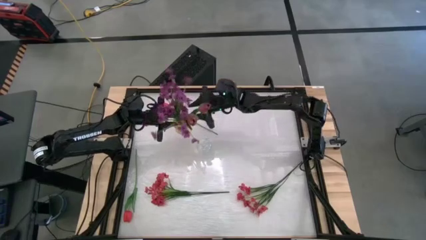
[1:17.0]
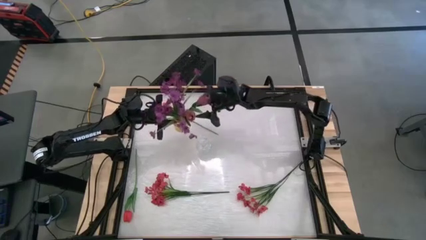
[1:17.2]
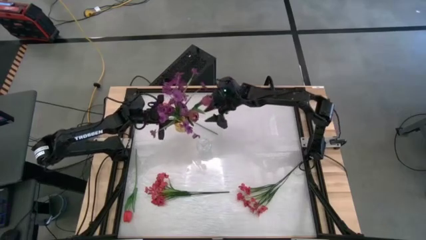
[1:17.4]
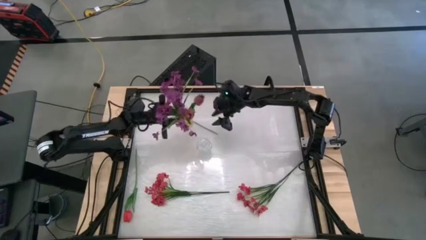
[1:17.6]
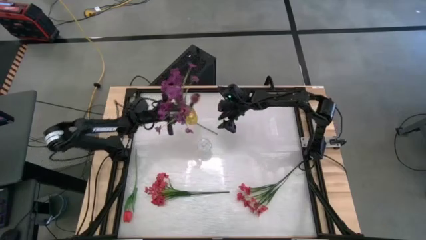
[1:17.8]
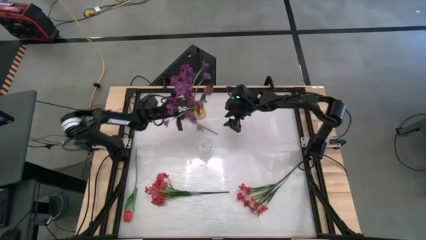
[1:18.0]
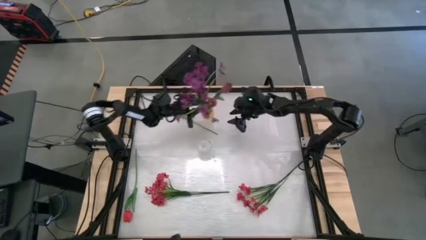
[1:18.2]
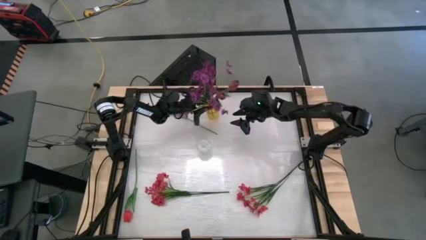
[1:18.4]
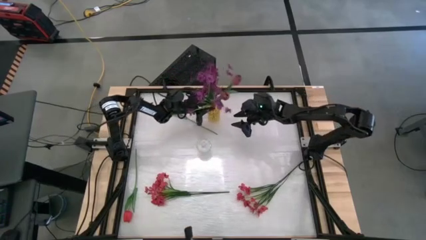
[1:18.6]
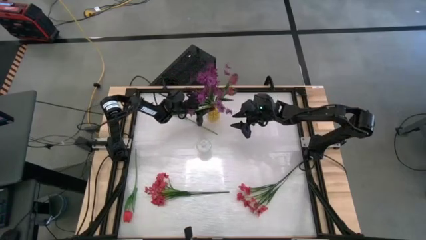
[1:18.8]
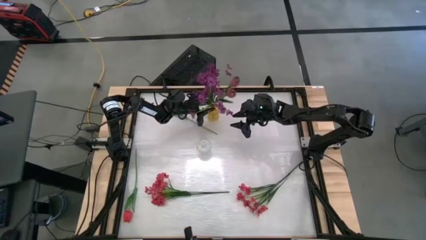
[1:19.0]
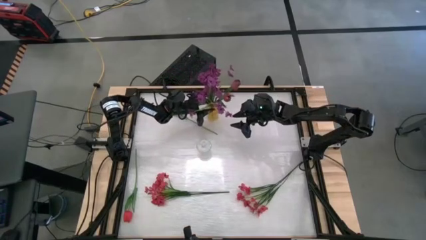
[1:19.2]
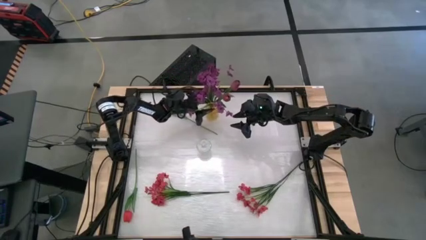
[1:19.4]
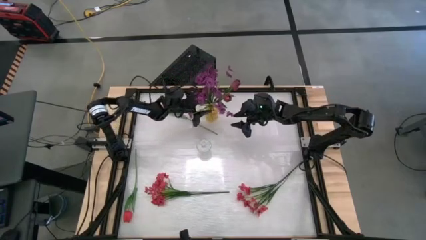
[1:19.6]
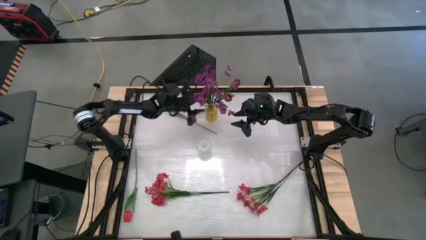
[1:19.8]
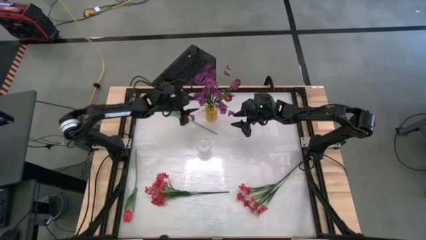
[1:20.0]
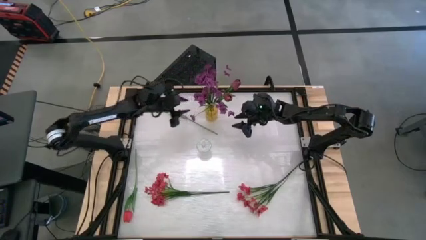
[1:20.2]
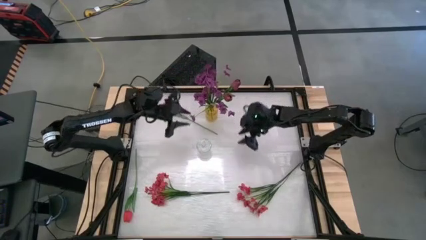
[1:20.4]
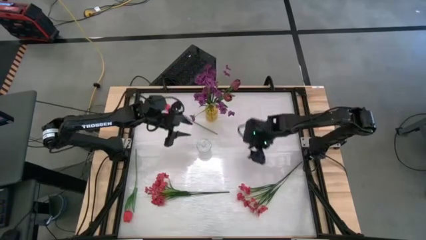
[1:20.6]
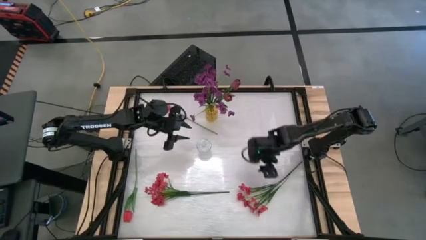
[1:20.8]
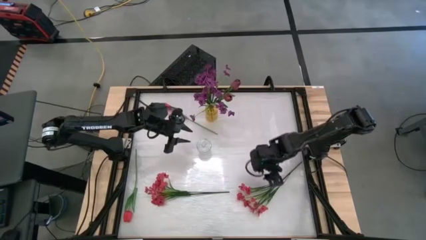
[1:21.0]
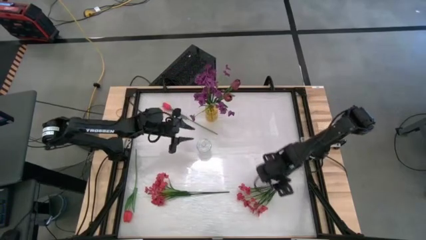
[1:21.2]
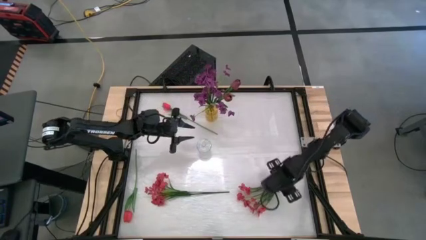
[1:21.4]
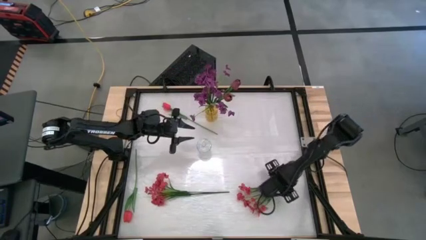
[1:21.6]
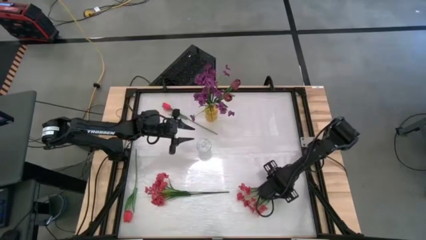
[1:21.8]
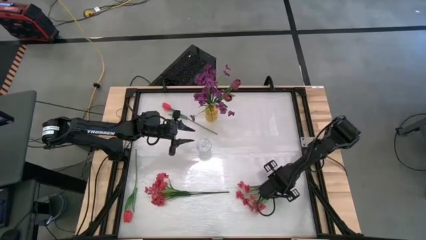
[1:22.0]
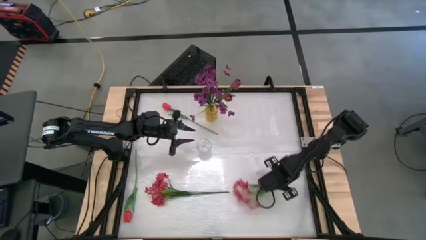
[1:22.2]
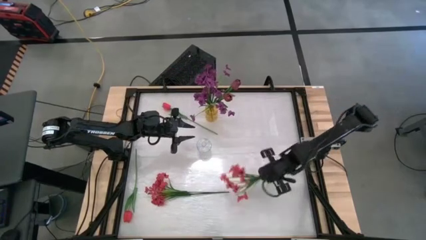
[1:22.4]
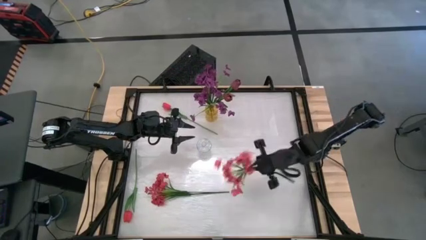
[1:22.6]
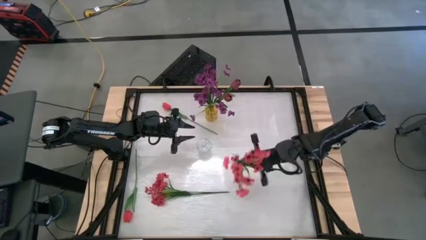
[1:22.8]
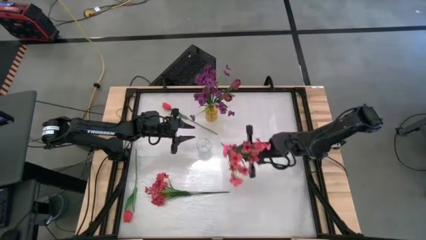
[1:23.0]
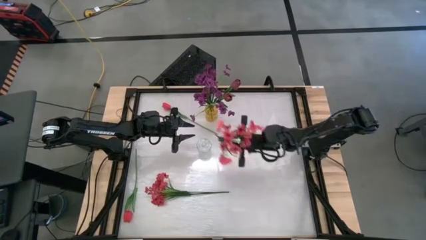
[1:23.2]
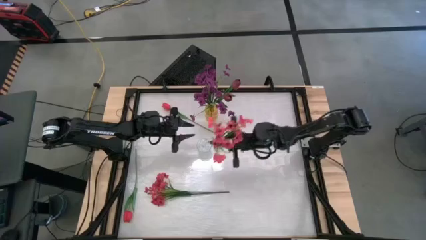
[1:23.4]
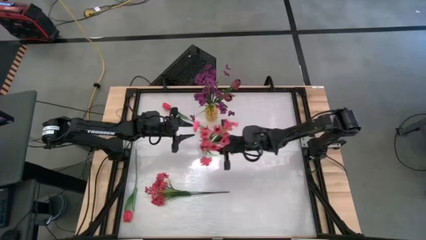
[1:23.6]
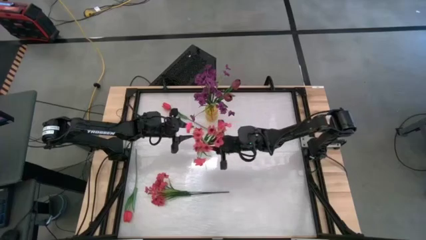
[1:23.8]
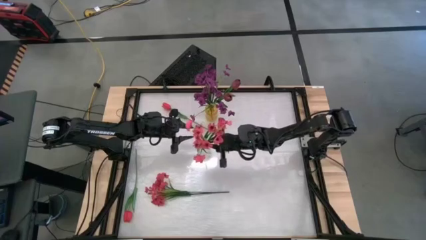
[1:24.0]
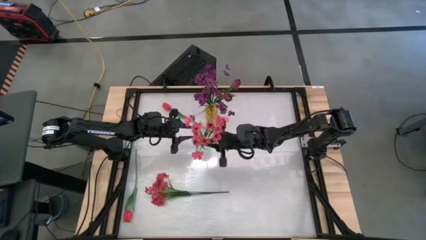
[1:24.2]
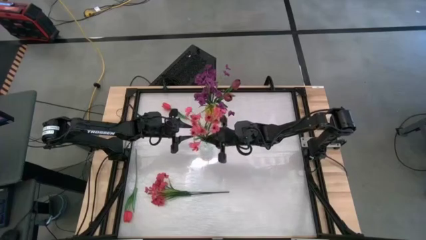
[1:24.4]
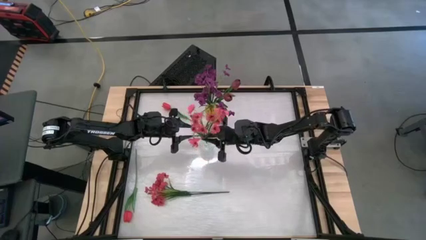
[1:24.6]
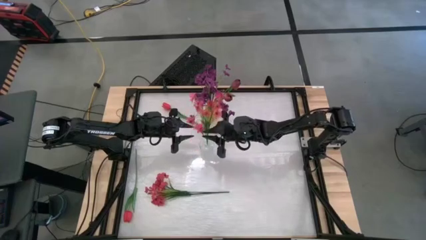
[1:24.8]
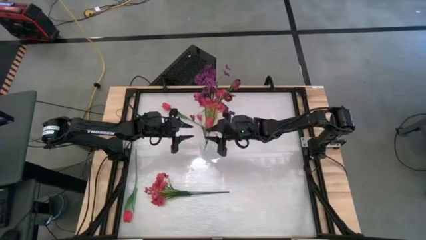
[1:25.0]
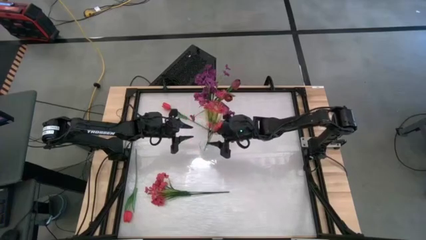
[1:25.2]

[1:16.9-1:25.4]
Task: Sort flowers into vase by color
Put the right red flowers into the transparent vase

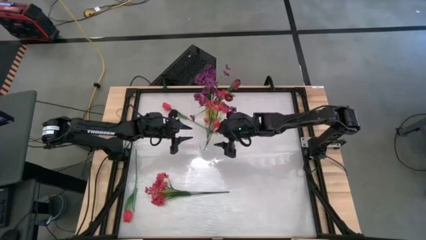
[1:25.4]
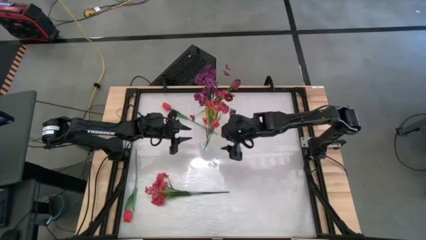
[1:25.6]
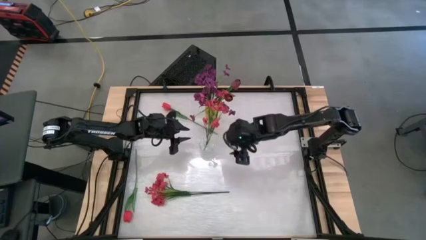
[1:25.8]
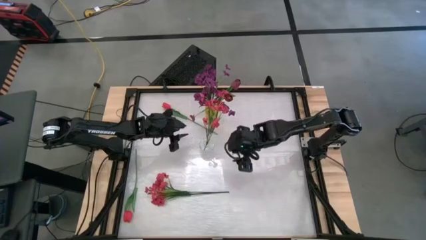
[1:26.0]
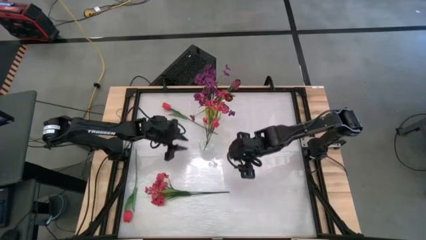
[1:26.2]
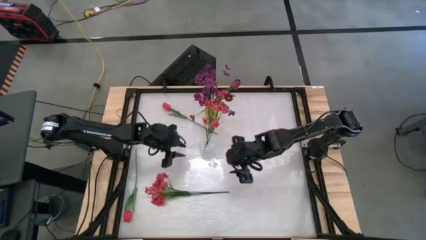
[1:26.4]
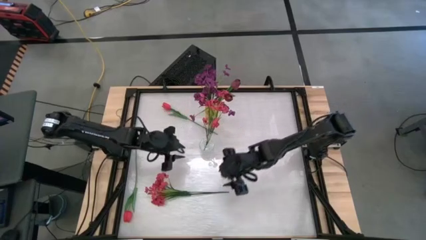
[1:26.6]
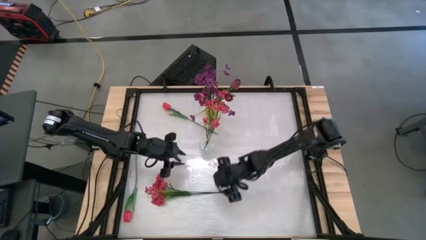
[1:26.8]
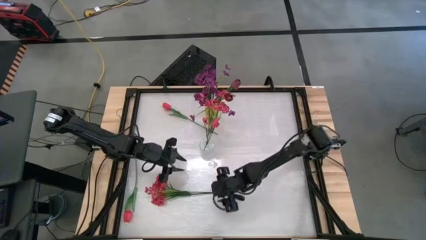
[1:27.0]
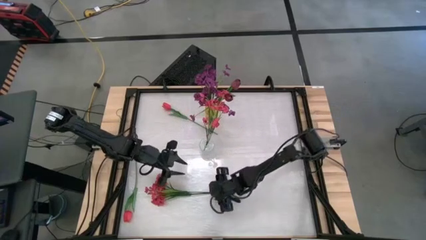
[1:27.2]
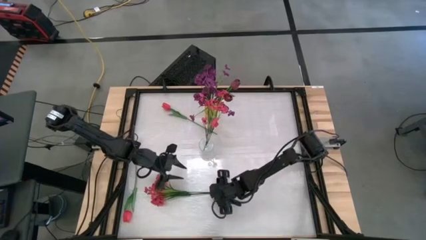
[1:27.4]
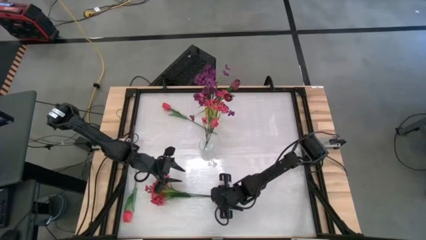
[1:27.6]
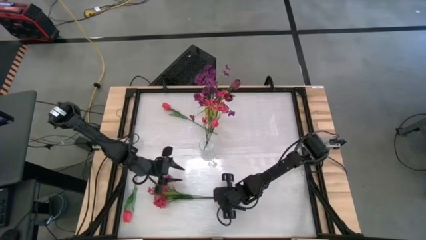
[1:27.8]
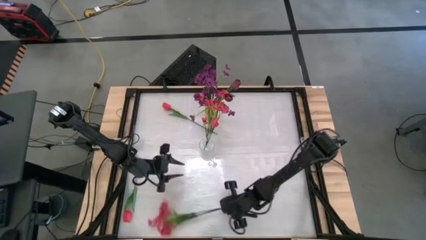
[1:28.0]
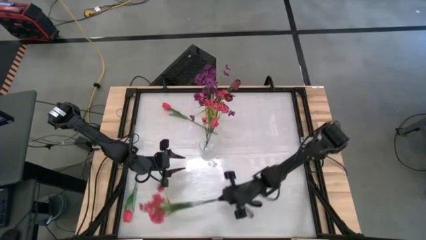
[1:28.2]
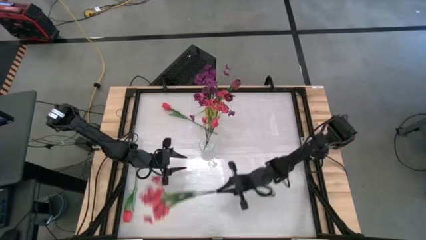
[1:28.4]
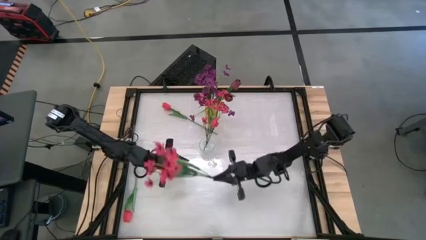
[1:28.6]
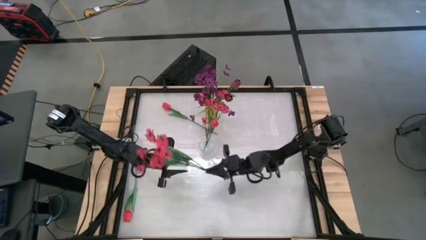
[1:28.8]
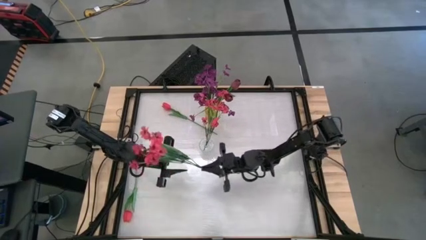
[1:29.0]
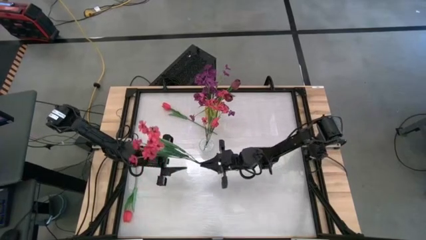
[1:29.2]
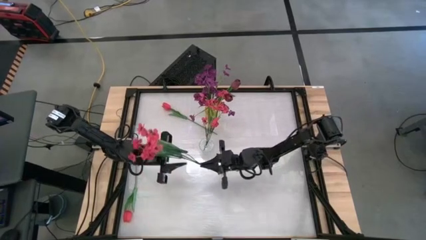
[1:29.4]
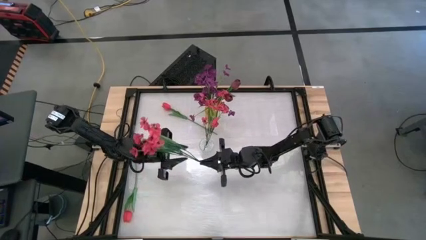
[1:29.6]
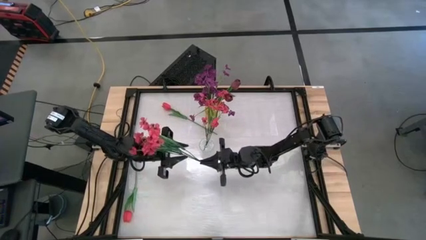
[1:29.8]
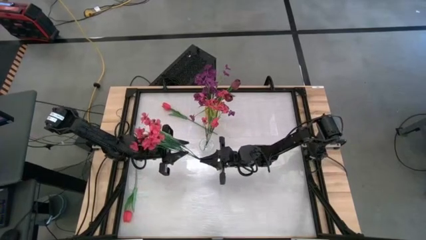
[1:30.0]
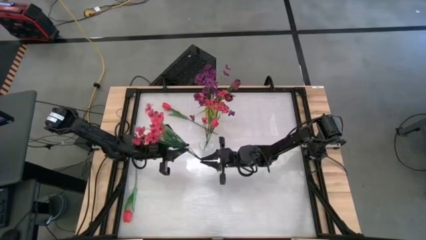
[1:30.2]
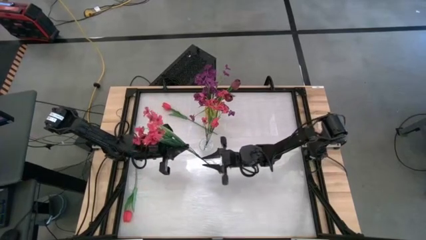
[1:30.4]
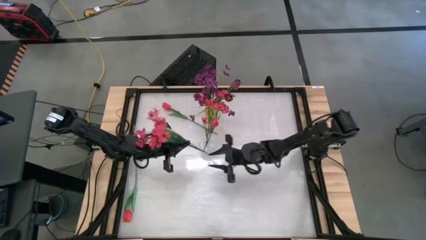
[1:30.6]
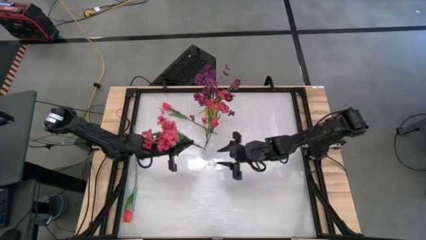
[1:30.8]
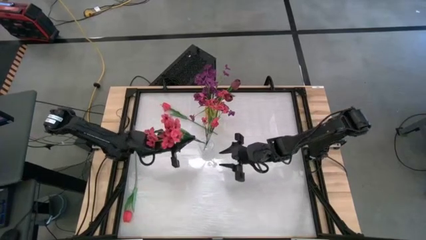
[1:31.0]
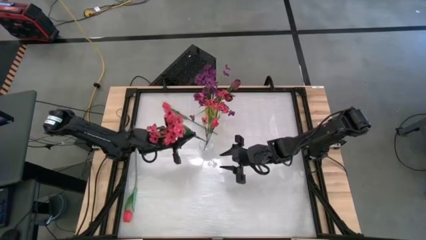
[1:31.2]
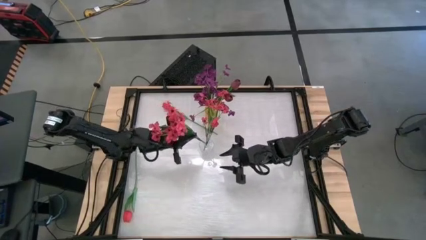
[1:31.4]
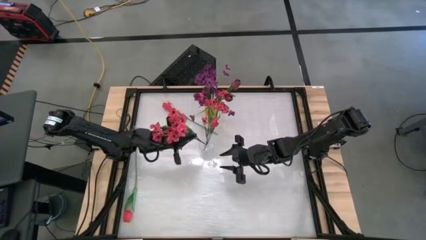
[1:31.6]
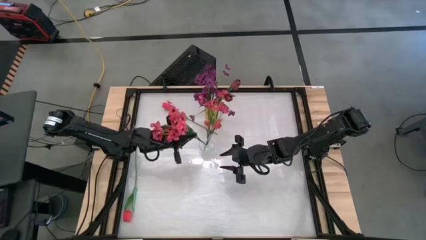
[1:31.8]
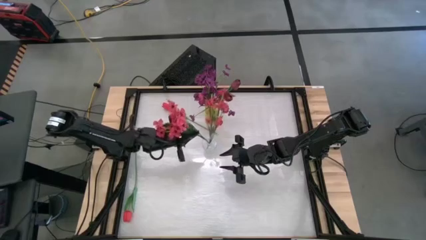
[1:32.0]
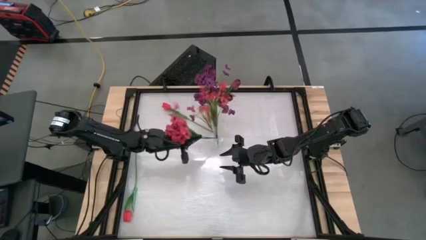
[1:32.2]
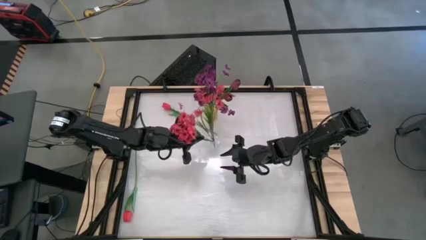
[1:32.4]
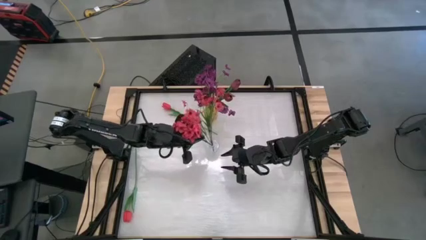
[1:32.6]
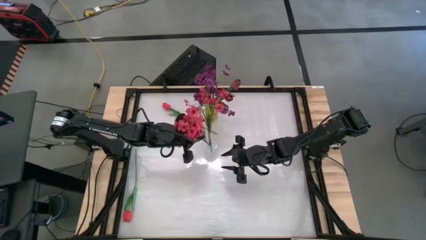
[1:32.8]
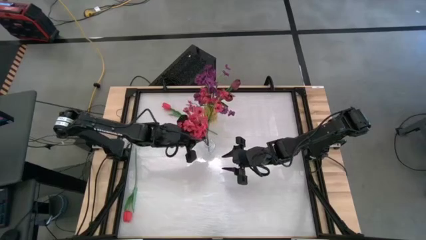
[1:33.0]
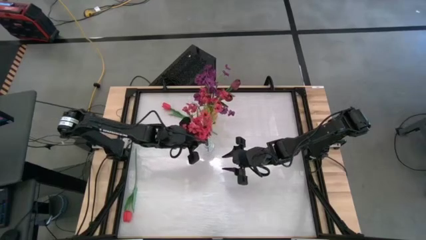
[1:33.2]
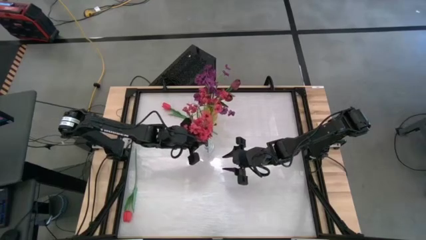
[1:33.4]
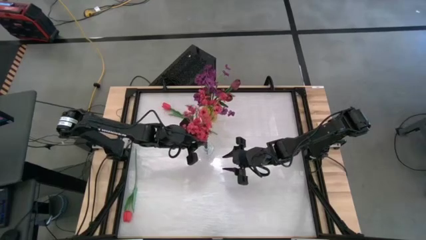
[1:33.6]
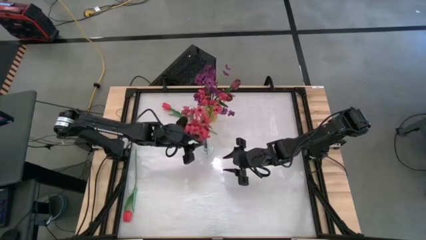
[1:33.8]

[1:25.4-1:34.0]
Put the red flowers into the transparent vase
